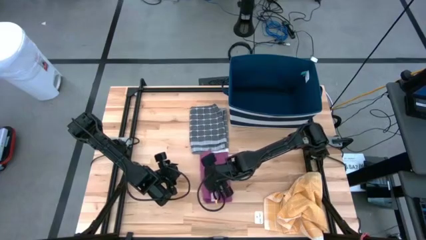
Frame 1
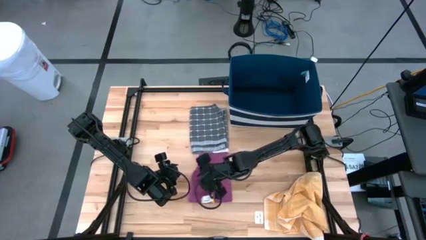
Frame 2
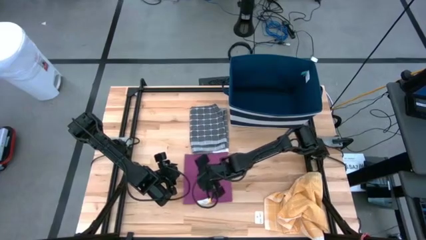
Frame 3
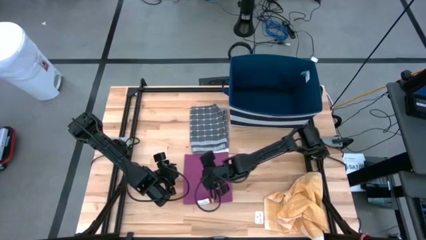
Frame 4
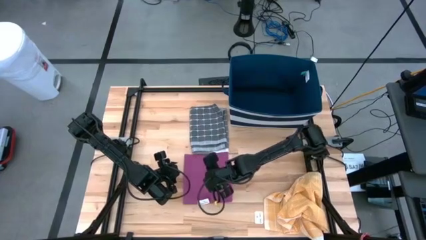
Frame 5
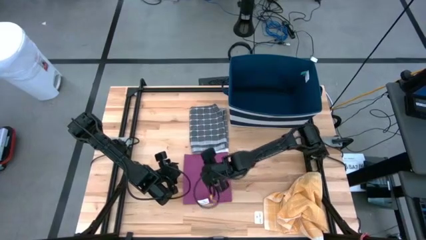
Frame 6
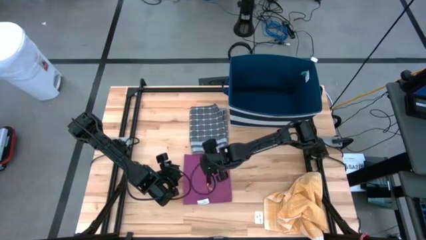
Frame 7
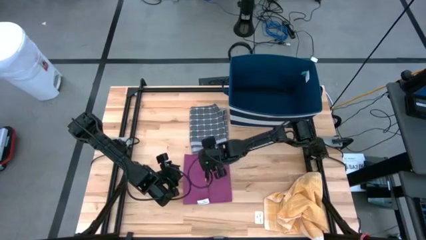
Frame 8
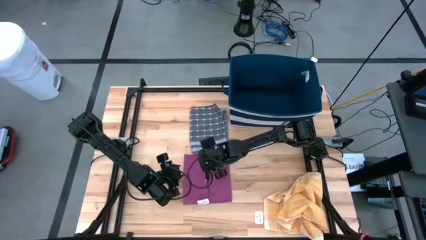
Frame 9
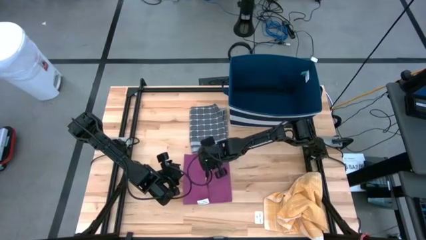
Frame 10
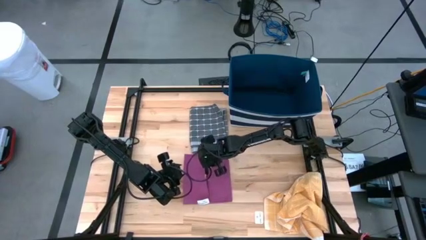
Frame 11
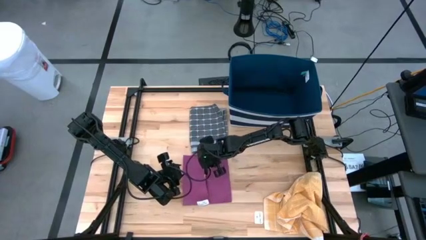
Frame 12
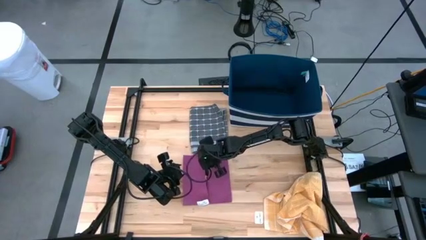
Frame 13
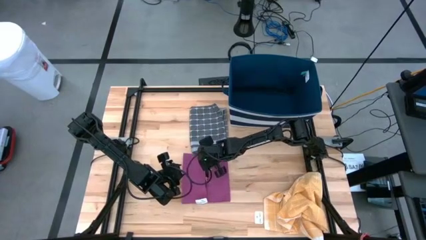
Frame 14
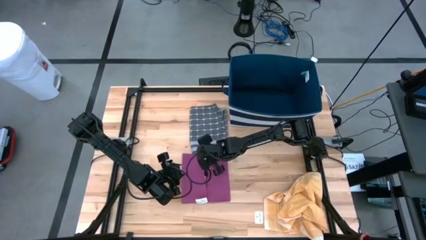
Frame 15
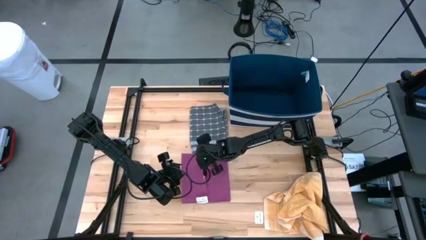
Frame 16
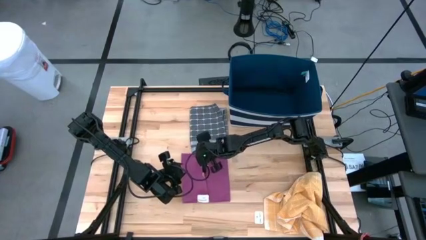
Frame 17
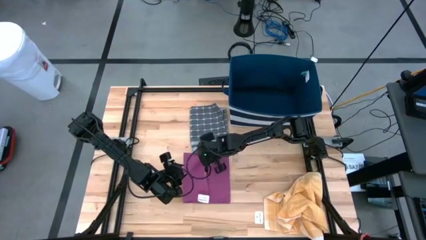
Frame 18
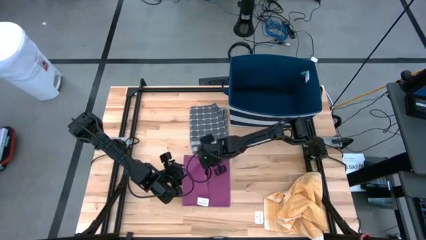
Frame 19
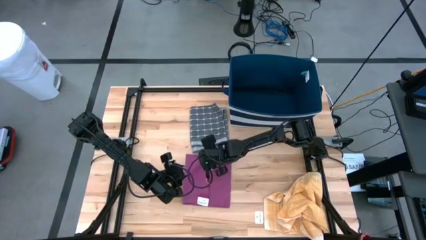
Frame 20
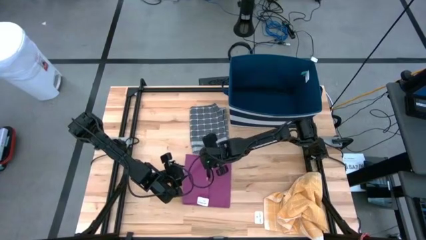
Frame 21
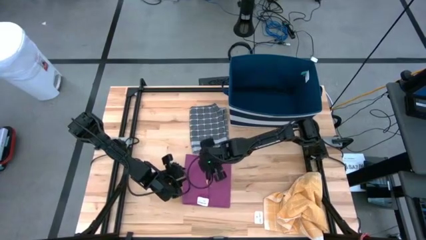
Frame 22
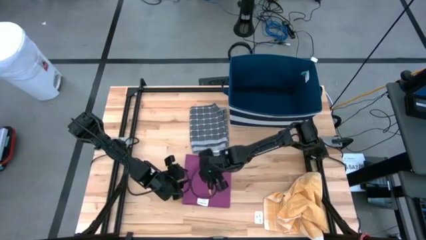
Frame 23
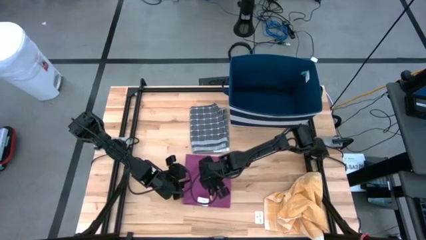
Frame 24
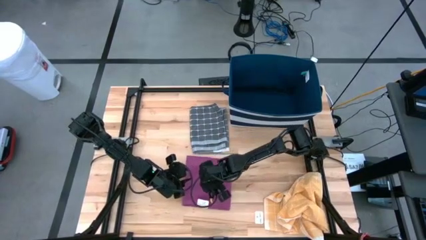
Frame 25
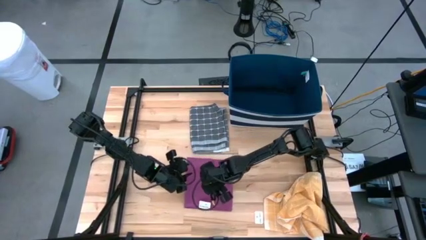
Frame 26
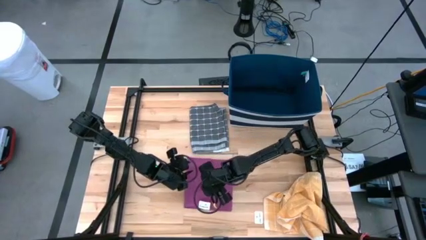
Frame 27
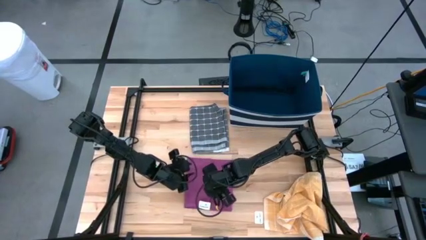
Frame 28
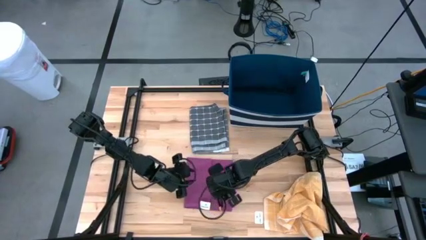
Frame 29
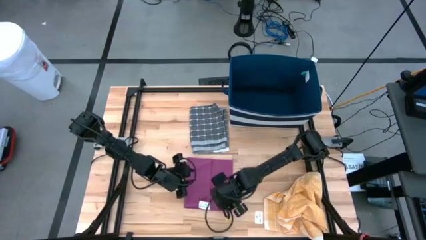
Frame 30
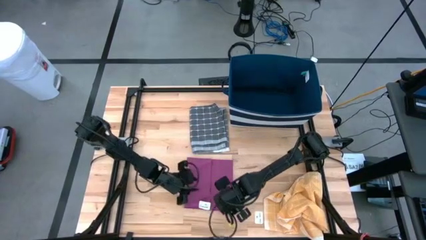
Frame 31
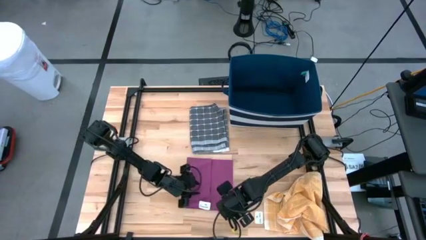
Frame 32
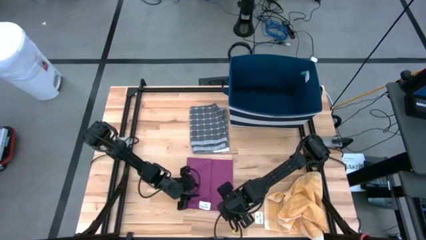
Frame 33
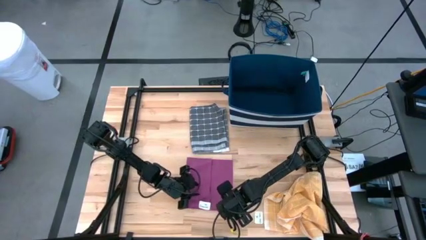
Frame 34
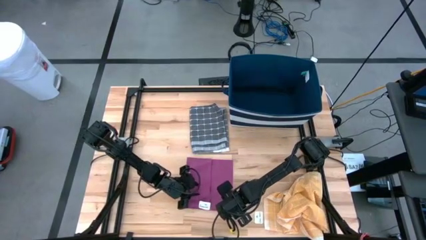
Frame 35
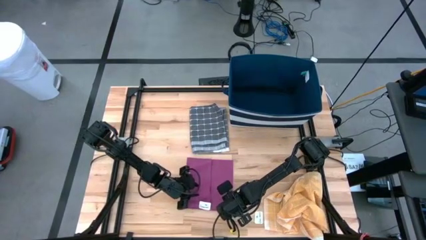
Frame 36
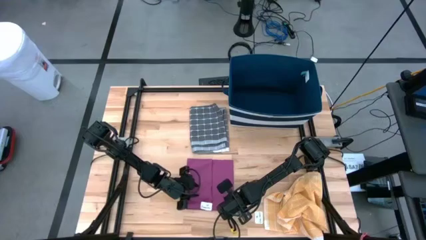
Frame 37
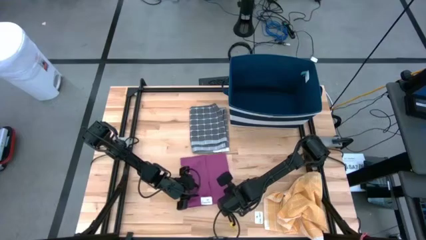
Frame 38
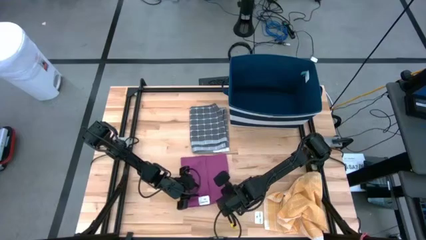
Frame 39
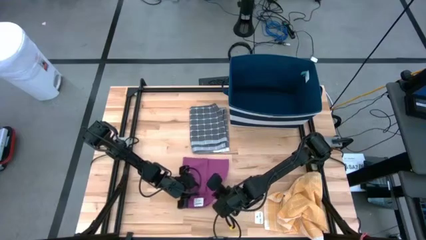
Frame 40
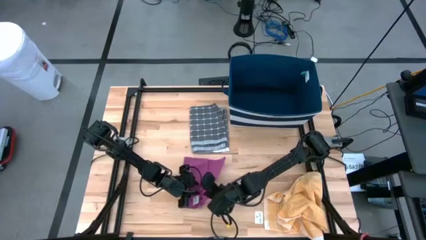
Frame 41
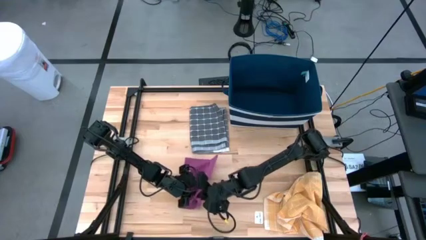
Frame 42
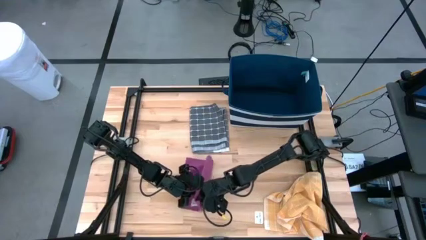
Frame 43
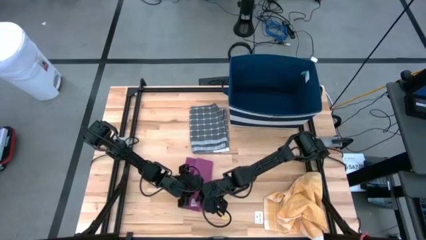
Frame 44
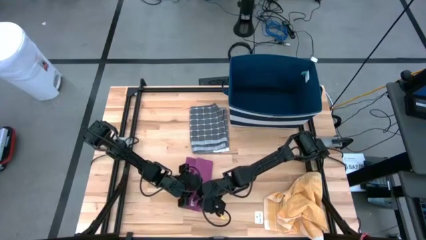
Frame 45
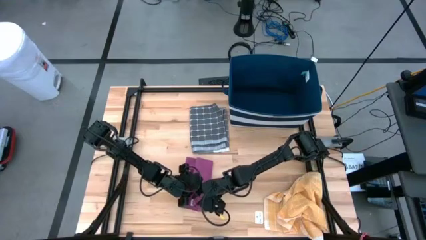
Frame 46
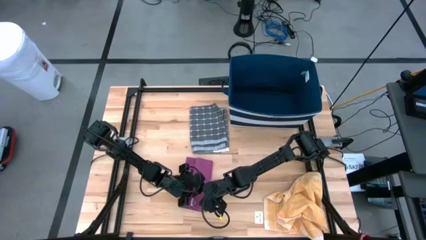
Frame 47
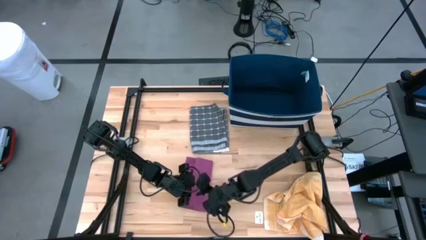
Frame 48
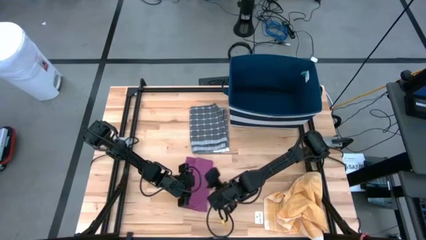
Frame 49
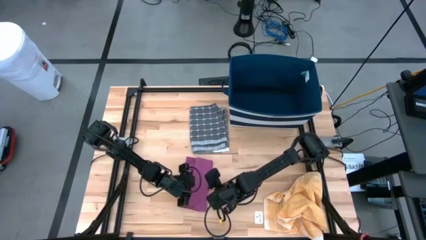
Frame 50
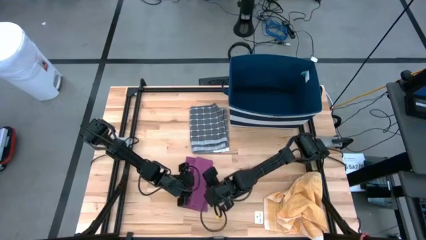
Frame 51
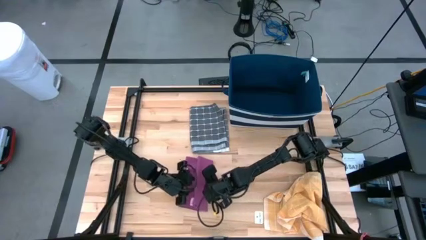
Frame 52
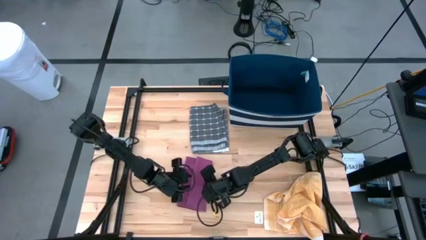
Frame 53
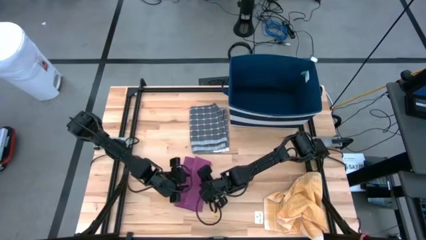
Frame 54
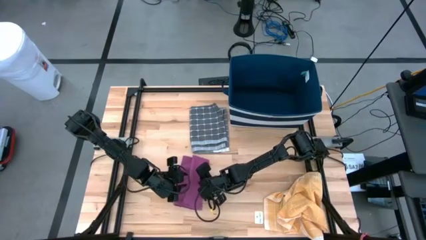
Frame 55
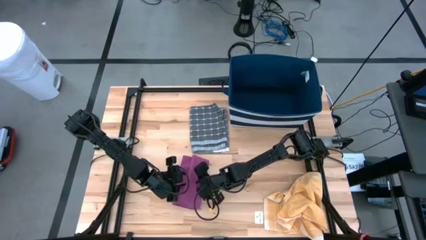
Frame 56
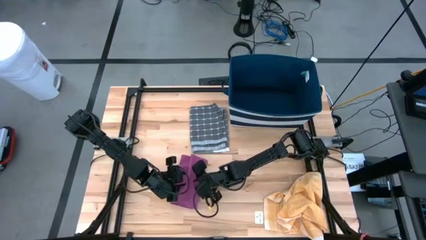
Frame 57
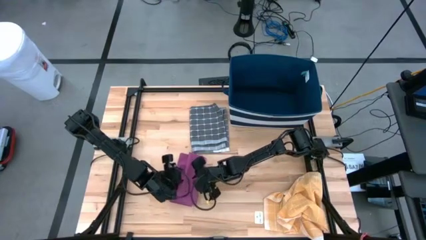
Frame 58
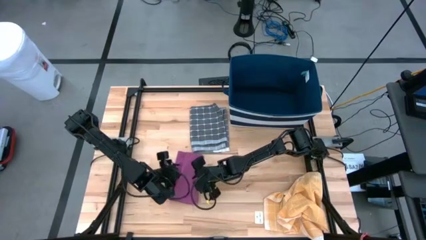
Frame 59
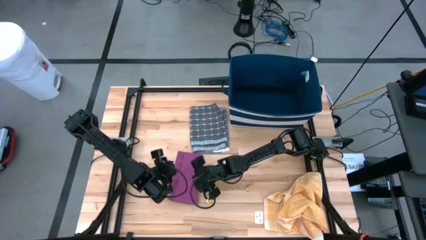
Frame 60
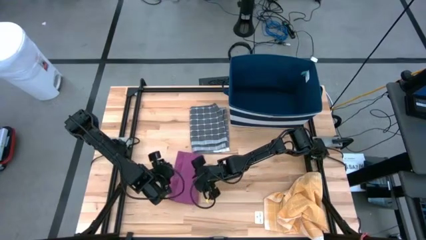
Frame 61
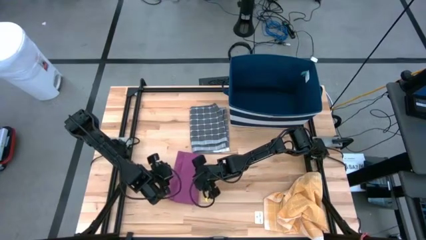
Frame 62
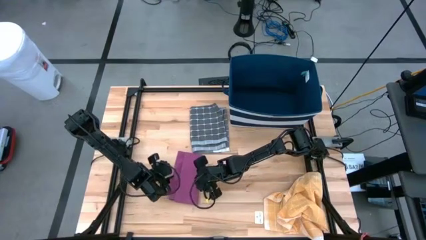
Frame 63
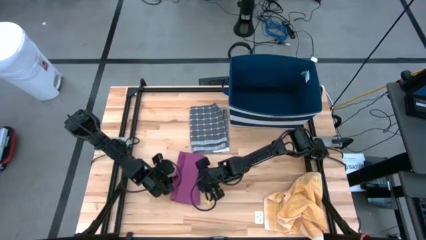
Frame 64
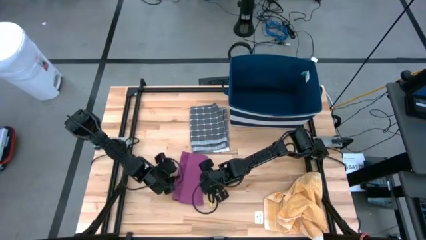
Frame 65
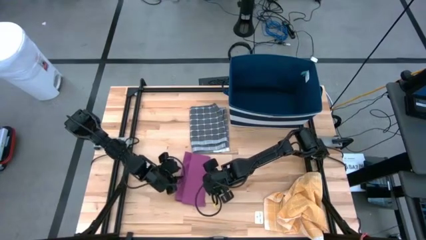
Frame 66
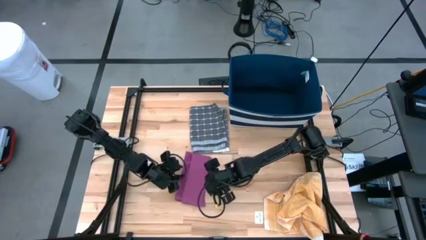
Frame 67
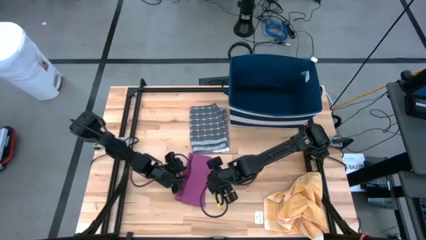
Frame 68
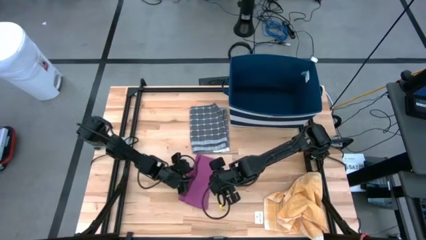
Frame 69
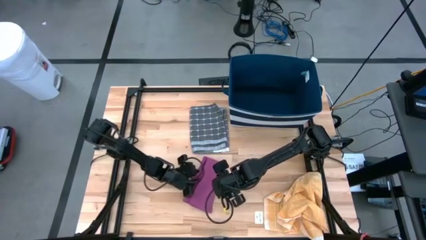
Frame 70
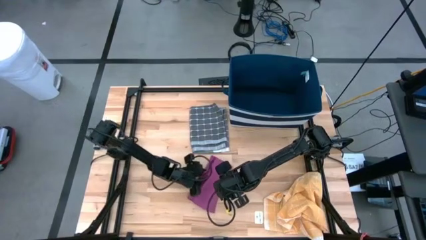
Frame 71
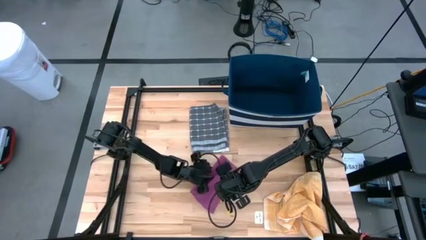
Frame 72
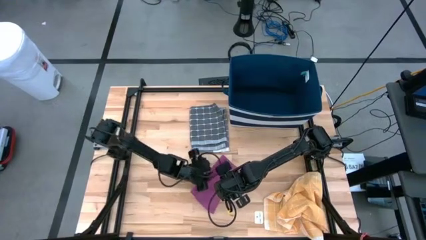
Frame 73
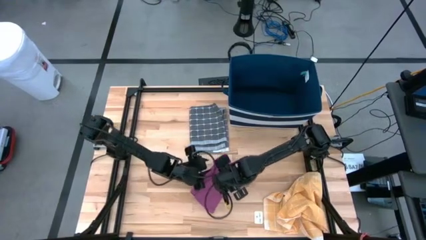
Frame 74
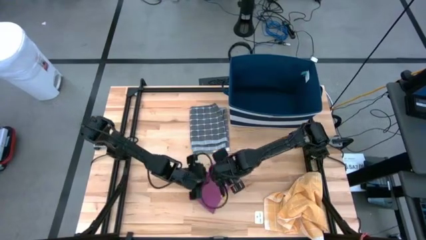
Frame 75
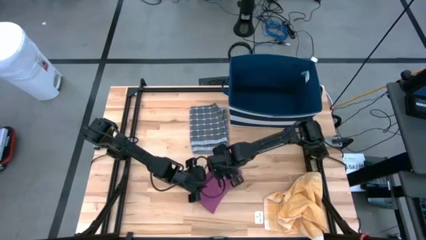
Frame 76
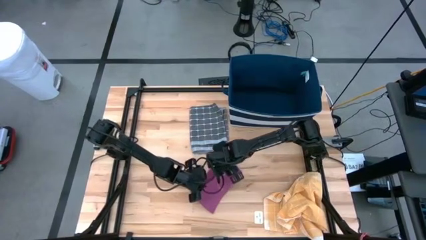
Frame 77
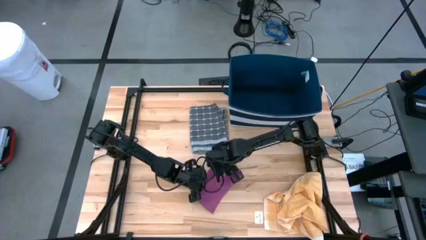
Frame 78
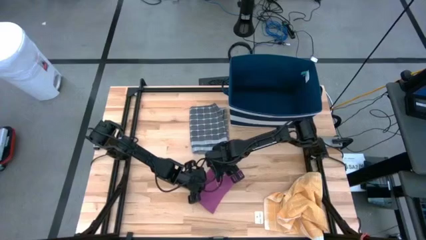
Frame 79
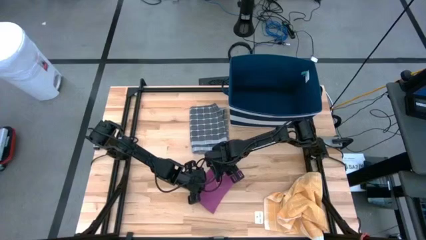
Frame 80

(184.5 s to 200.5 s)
Task: Fold towel
Fold the pink towel
